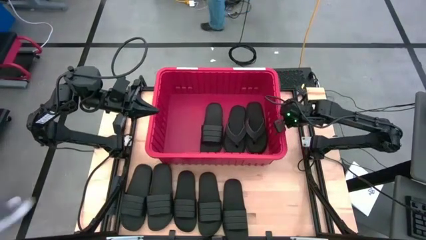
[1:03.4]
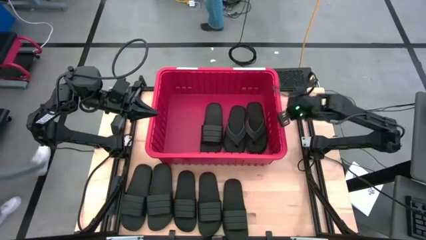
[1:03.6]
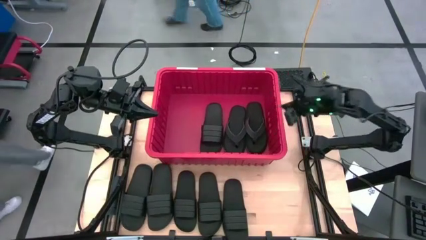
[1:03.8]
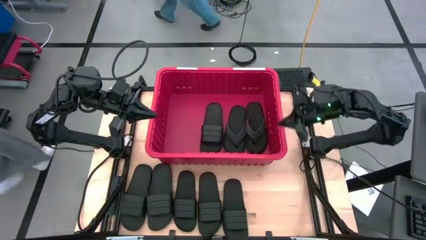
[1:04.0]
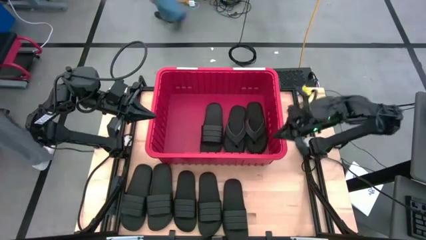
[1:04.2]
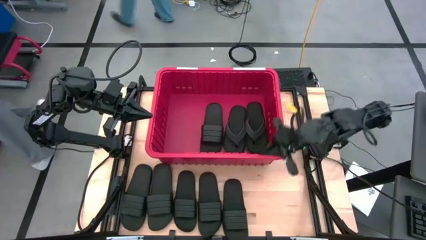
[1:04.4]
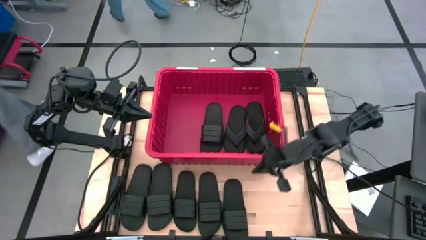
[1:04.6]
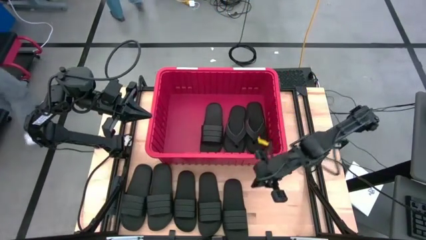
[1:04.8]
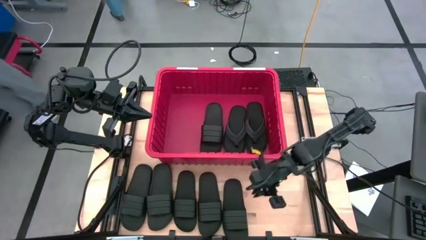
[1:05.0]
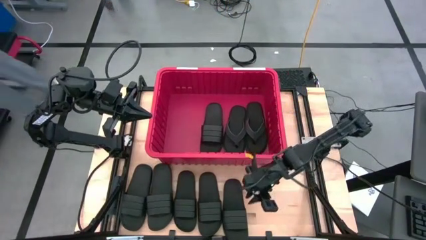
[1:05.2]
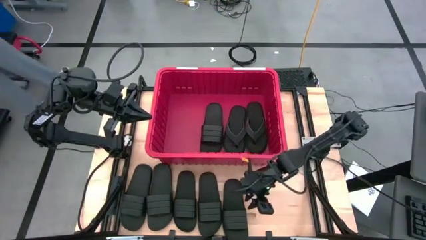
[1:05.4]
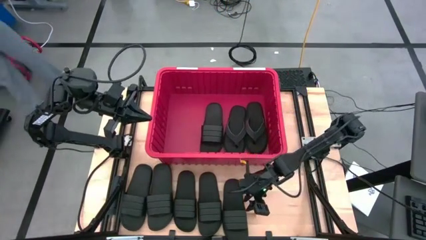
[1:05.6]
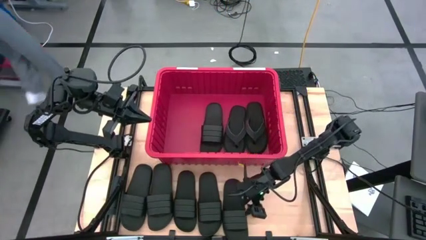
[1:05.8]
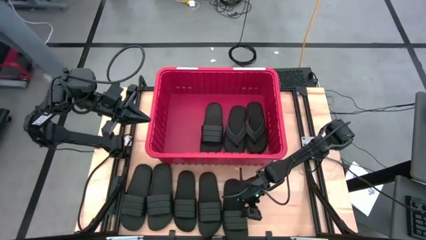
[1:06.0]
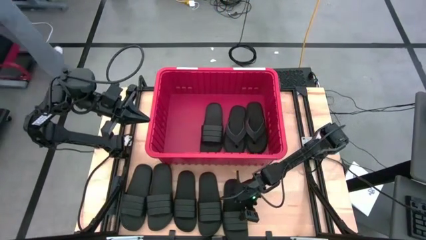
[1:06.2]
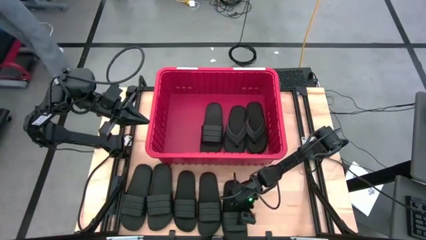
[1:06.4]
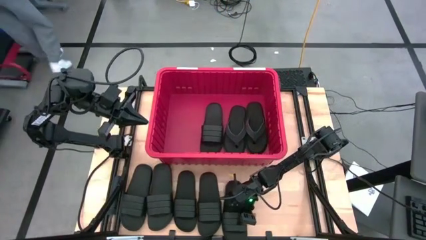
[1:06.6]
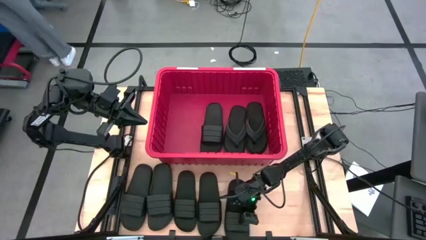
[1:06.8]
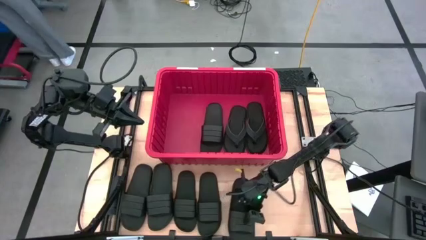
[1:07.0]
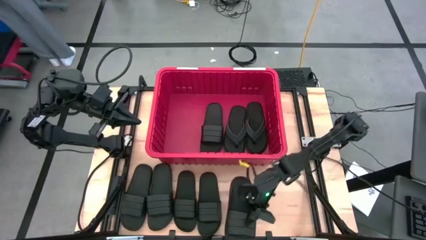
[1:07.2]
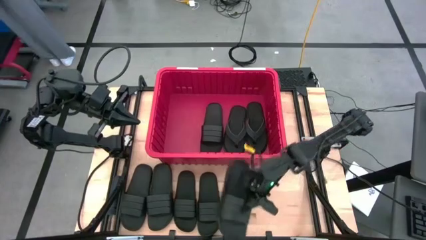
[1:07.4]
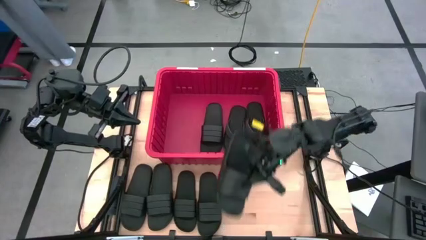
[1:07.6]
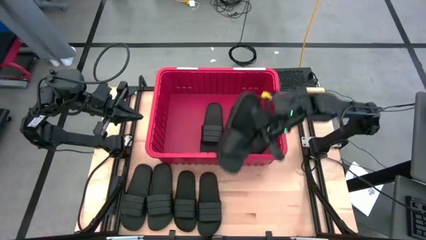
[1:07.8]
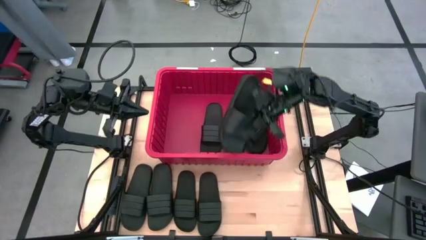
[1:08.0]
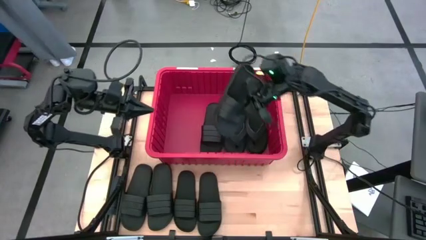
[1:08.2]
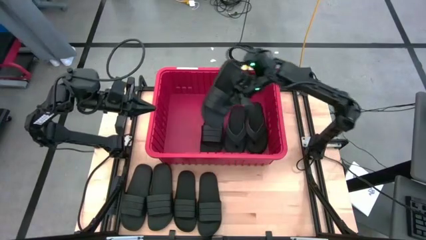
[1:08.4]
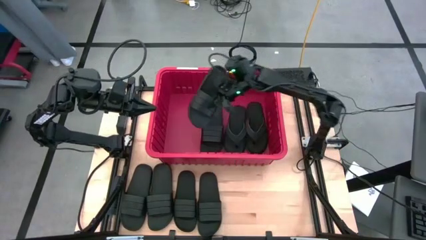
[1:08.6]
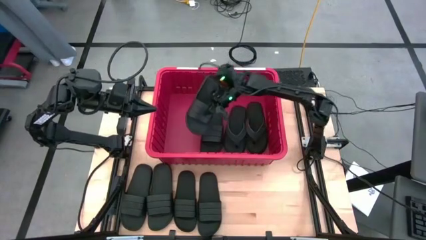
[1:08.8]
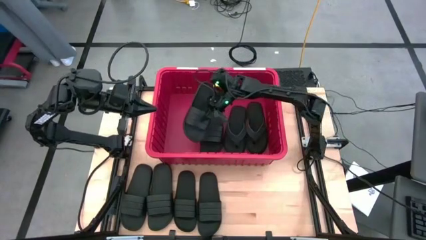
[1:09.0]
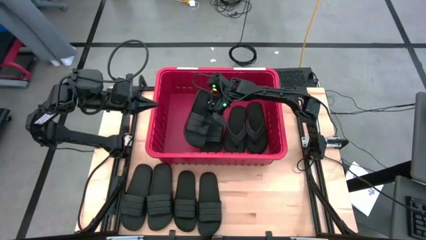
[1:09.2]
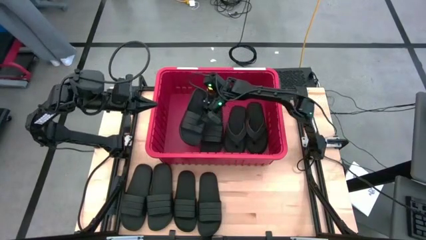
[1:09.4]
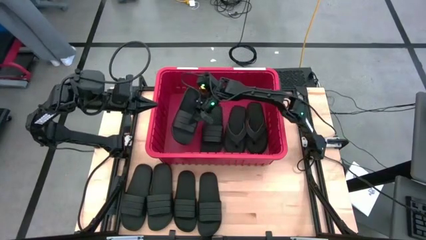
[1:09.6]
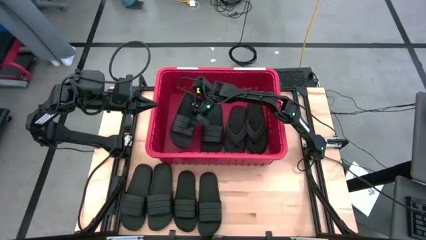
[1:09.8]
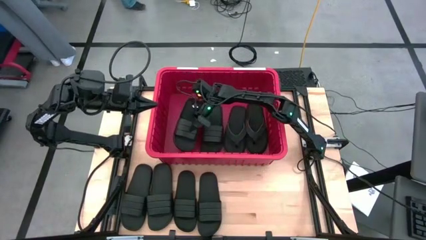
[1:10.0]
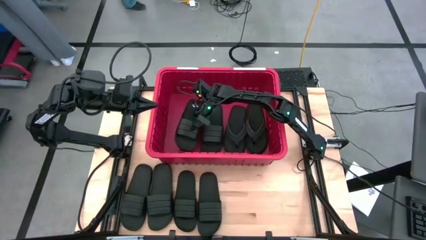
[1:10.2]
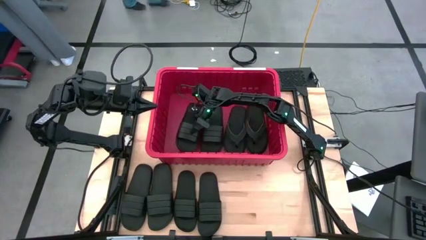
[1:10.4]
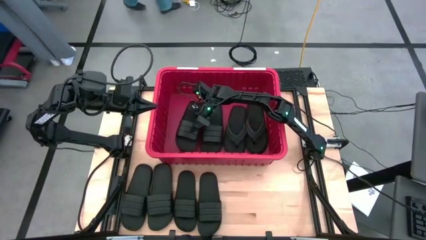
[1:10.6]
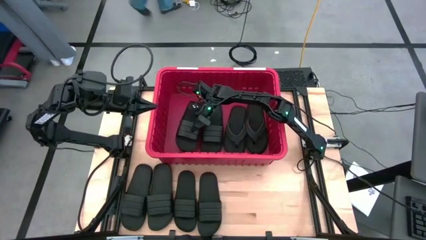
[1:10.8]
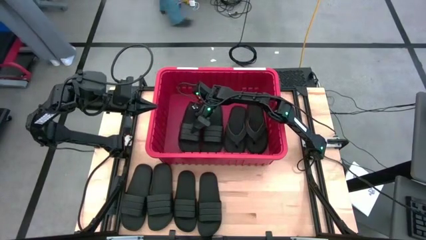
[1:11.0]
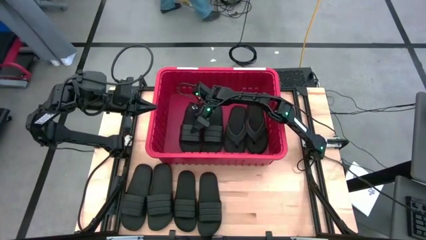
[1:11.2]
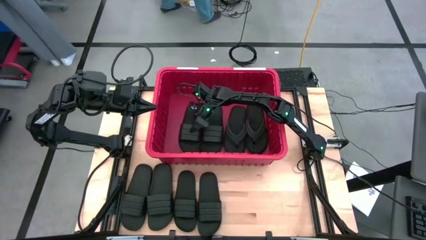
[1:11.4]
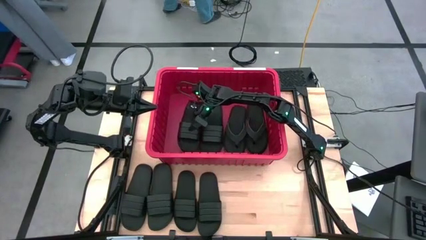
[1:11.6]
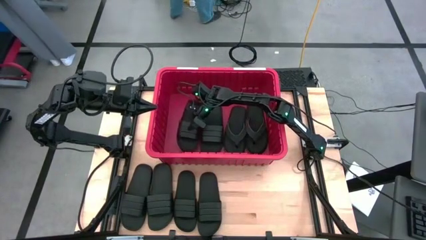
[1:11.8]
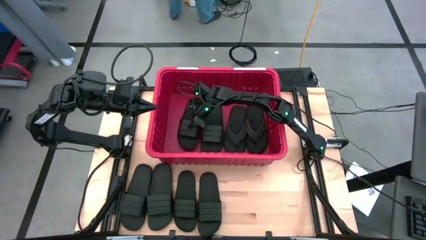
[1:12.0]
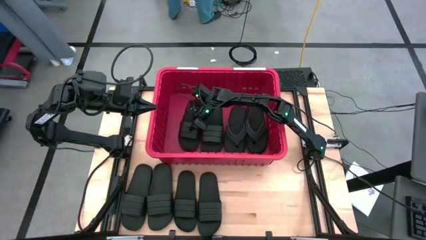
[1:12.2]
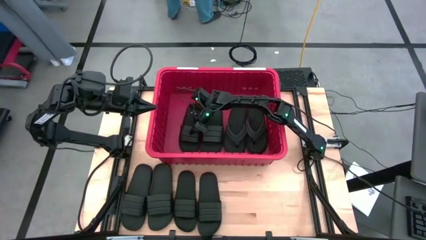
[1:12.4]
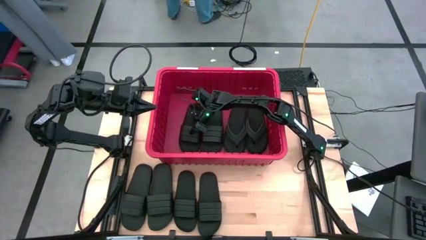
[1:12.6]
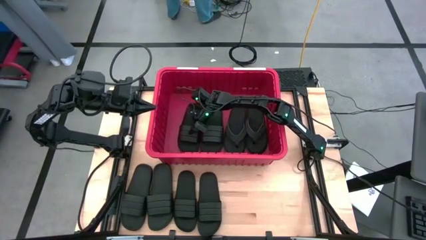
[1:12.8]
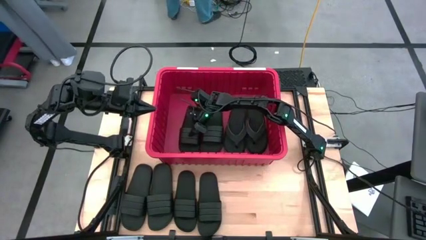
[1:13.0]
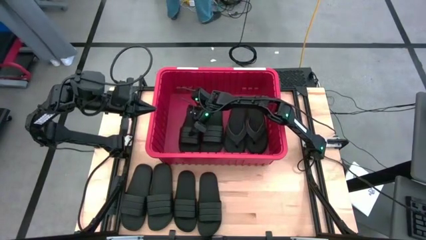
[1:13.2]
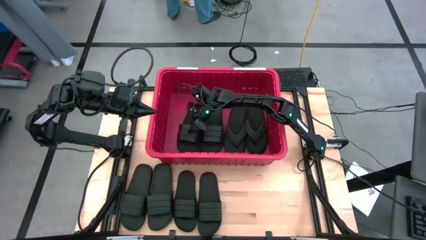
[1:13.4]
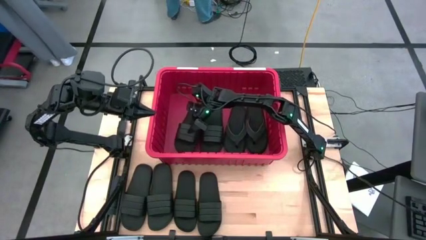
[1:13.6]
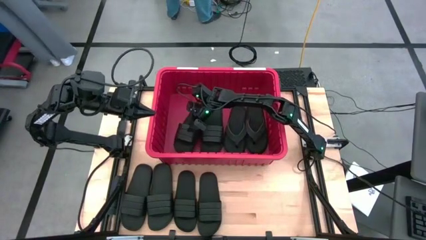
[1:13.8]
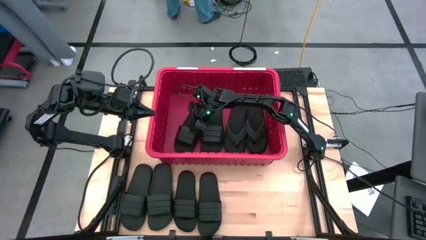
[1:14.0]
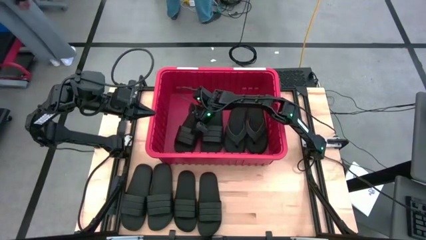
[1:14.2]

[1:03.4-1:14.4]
Task: Pick and place slides into bin
Put the black slide into the red bin
